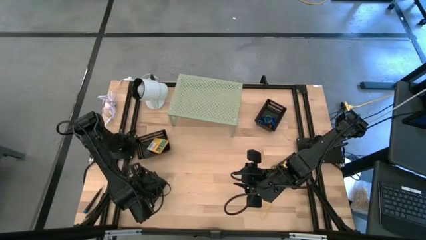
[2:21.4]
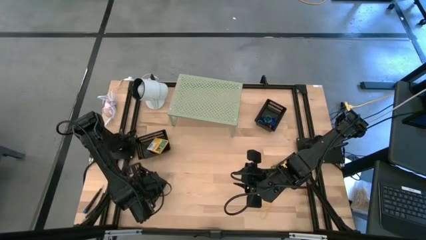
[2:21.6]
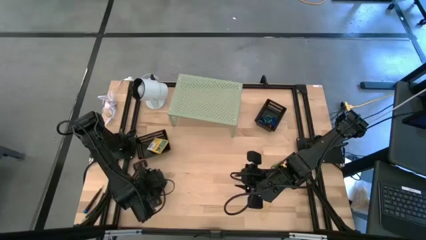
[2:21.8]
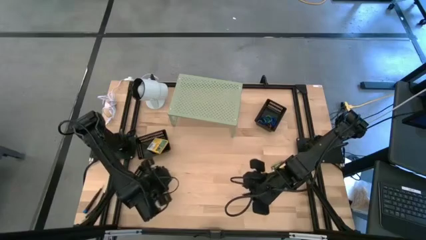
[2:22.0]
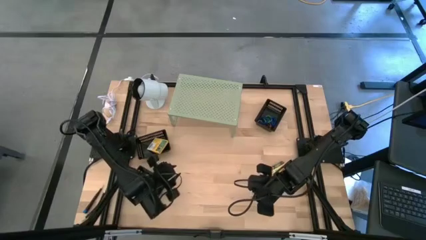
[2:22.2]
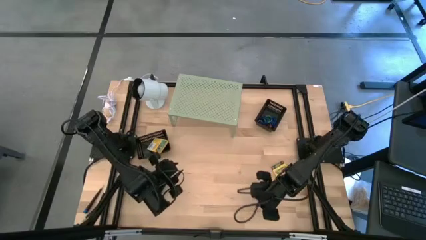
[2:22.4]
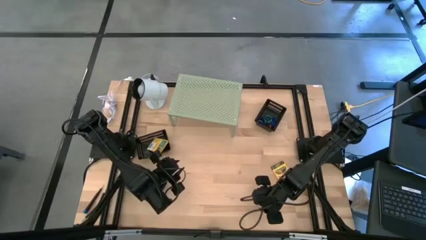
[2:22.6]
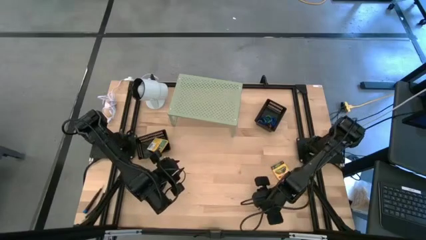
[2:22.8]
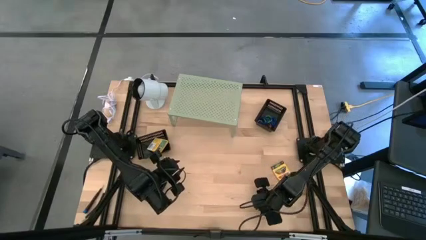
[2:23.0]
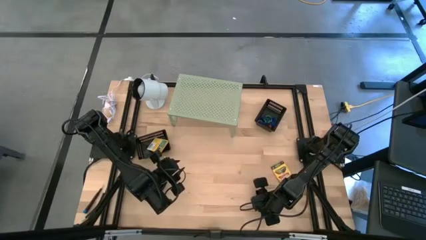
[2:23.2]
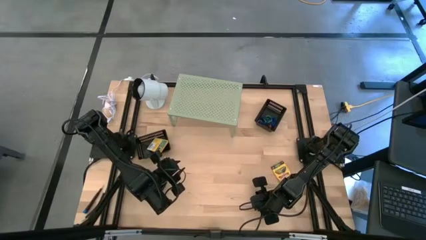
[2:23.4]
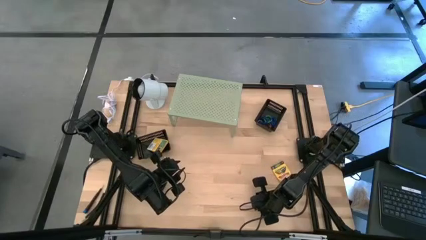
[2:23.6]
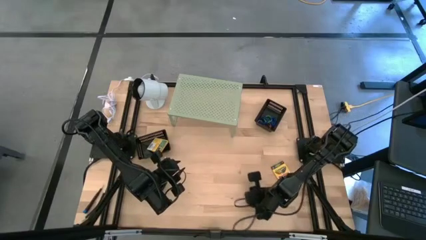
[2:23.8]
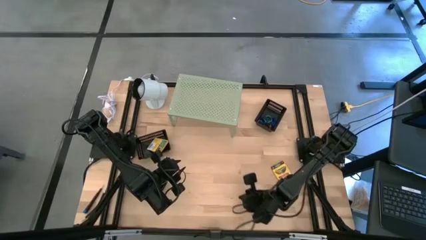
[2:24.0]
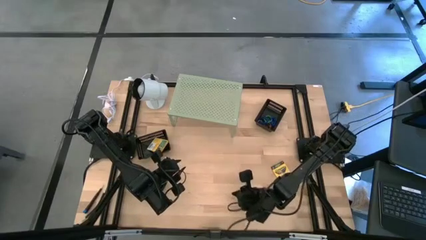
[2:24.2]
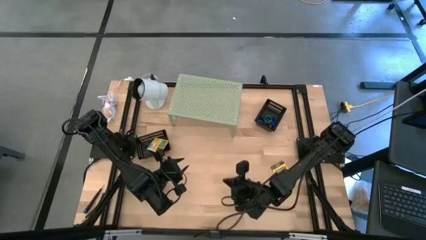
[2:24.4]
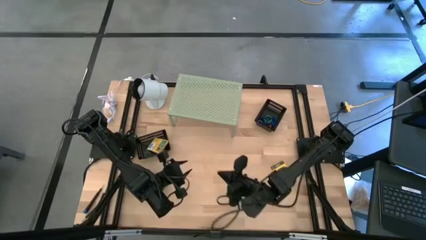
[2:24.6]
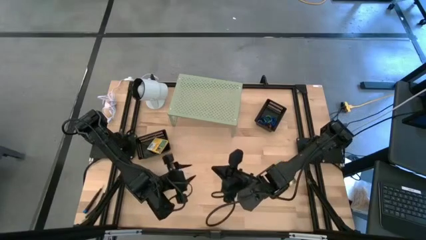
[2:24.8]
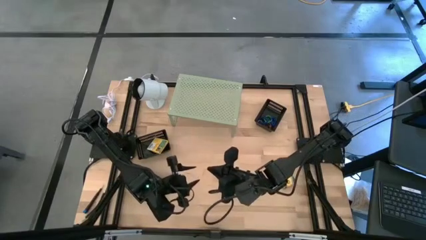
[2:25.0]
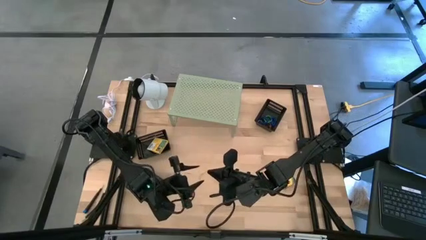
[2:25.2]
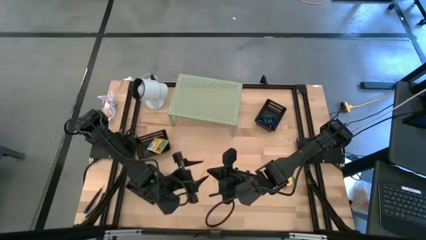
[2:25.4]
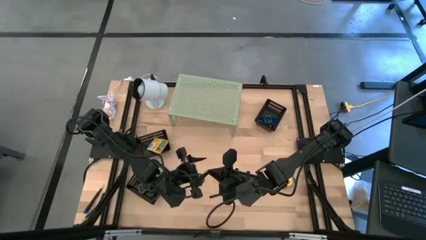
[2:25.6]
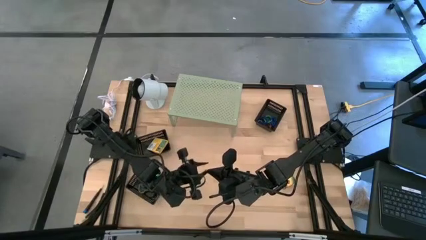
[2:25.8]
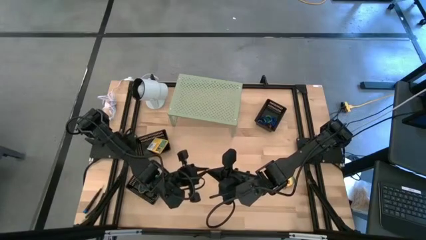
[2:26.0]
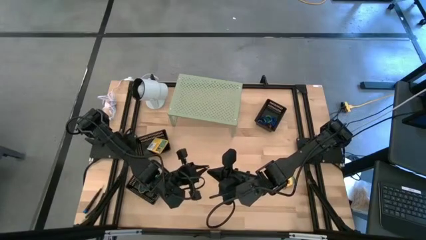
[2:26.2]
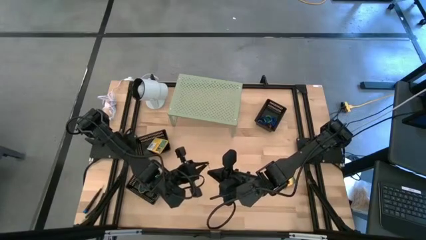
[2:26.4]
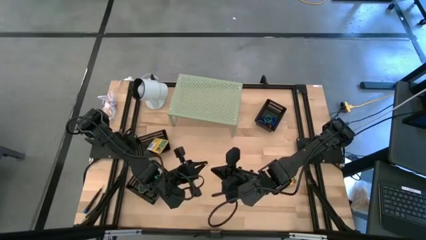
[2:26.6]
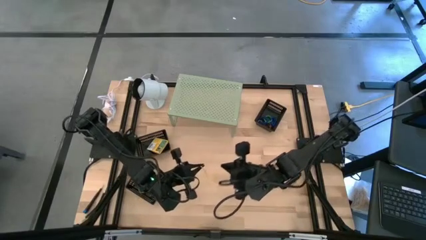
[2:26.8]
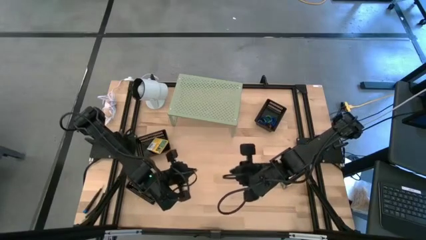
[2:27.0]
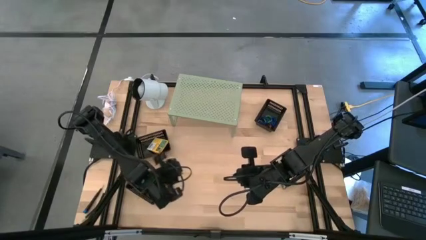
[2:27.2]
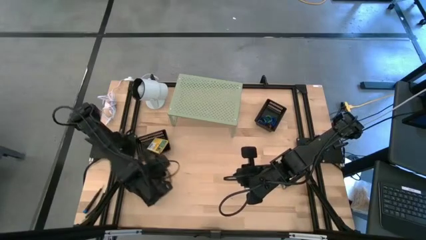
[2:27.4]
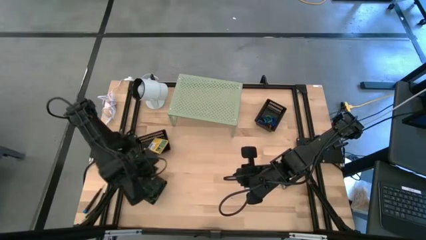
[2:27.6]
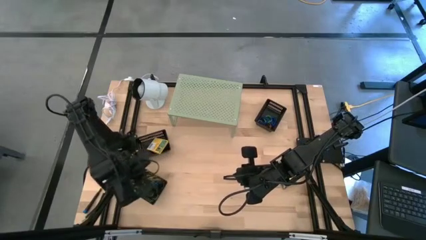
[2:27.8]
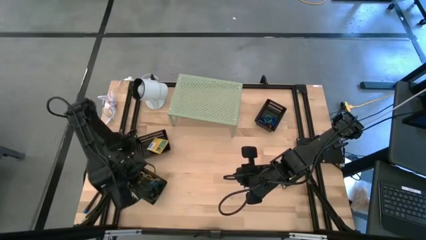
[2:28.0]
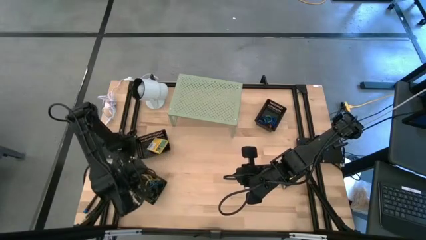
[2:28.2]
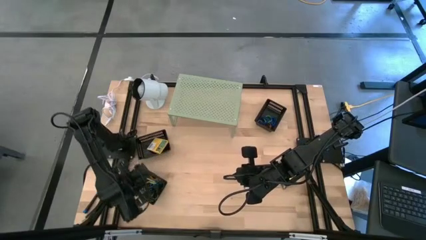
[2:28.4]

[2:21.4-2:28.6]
Task: Pick & Place Office Desk Supplies
Put the yellow rubber band into the bottom left black bin

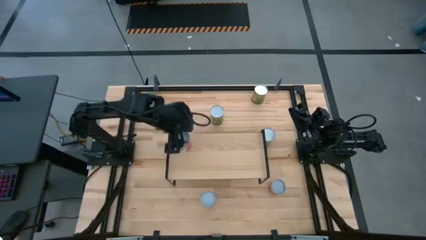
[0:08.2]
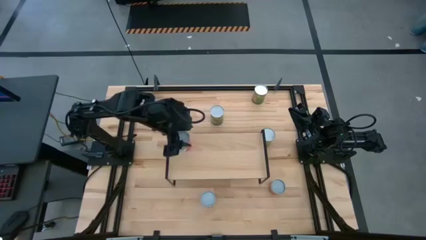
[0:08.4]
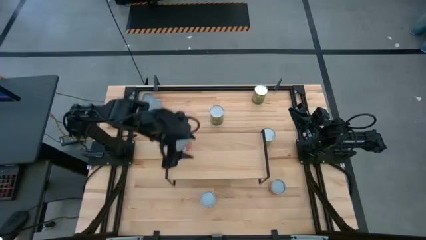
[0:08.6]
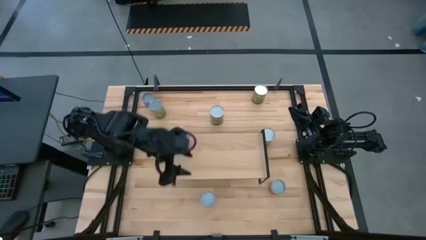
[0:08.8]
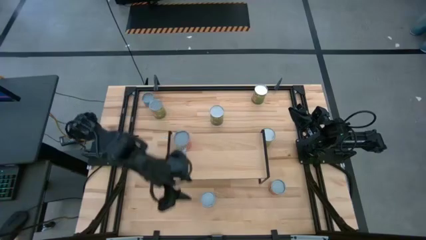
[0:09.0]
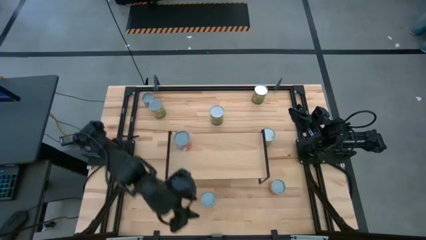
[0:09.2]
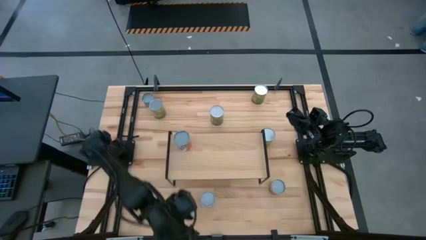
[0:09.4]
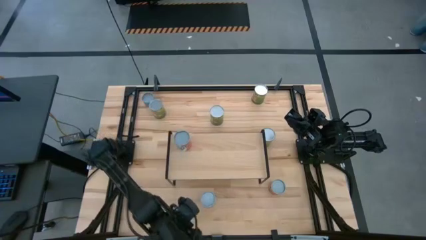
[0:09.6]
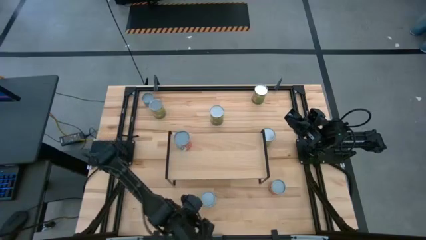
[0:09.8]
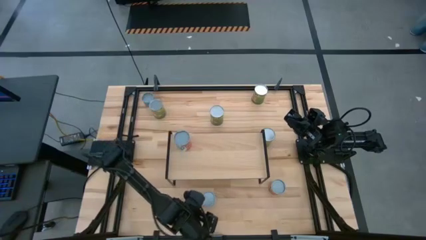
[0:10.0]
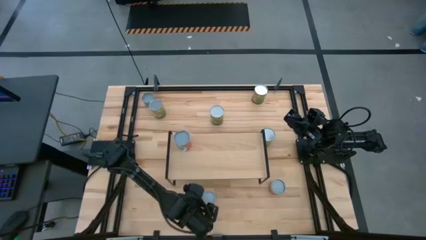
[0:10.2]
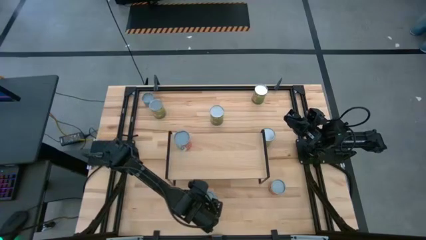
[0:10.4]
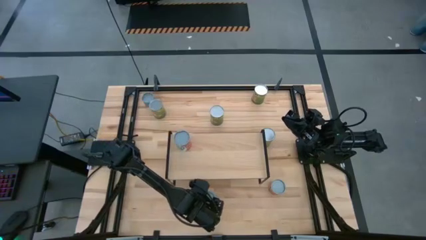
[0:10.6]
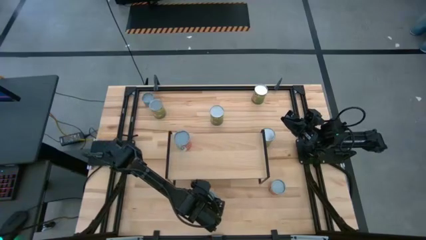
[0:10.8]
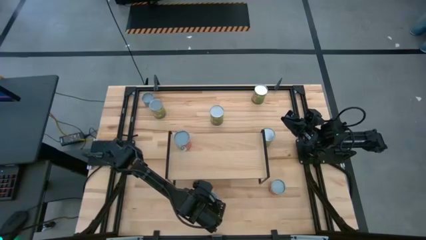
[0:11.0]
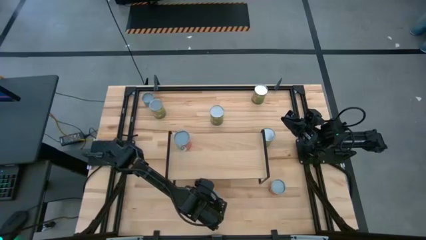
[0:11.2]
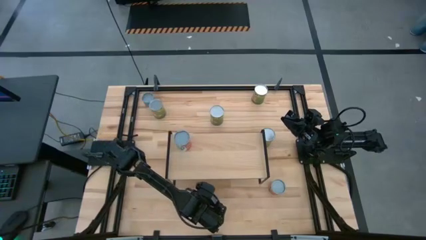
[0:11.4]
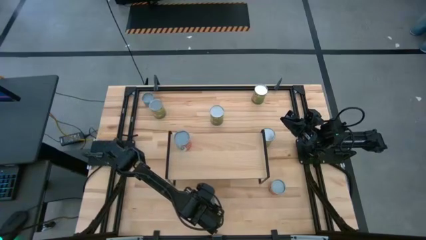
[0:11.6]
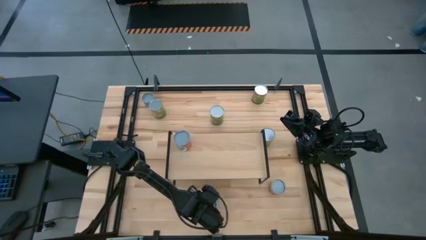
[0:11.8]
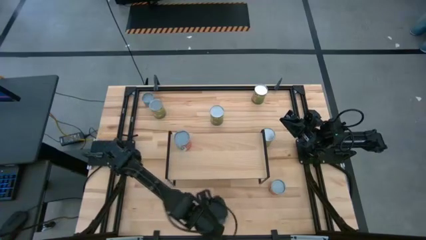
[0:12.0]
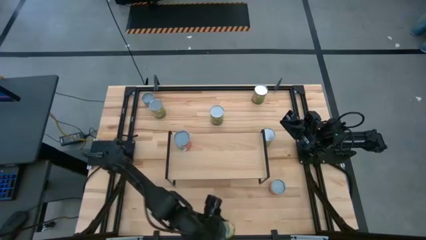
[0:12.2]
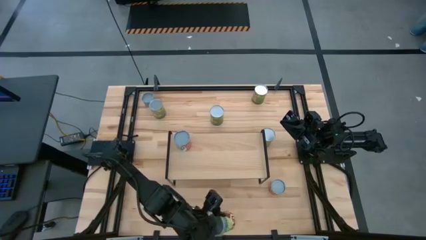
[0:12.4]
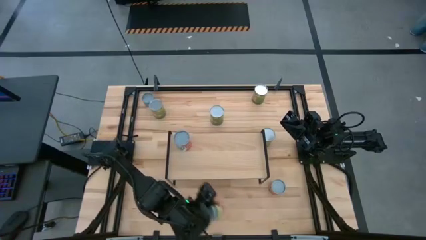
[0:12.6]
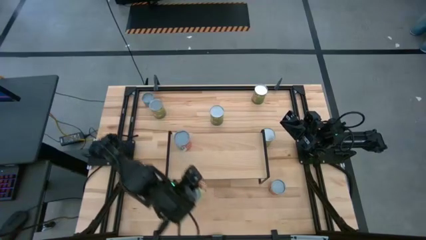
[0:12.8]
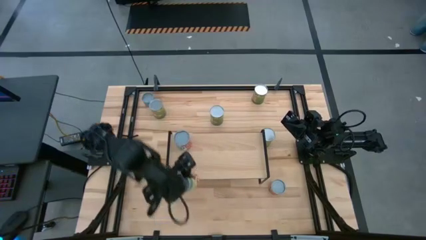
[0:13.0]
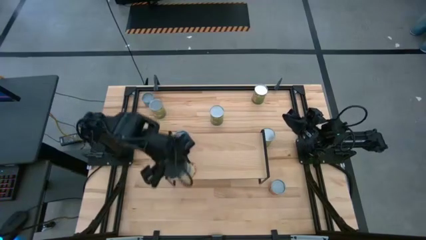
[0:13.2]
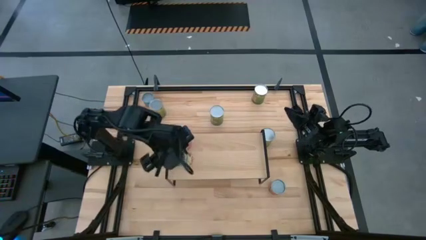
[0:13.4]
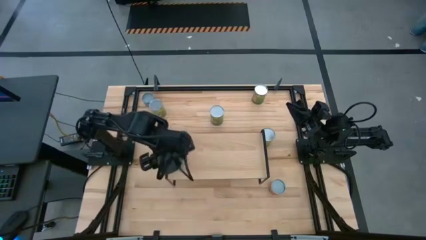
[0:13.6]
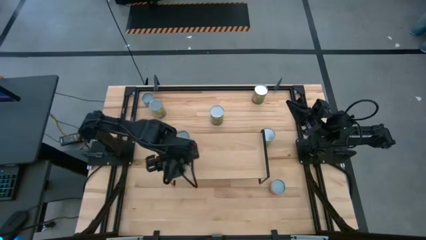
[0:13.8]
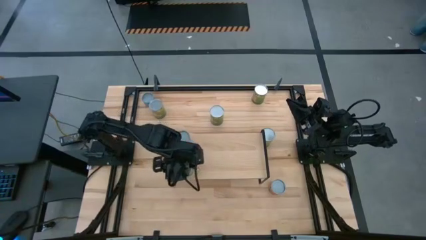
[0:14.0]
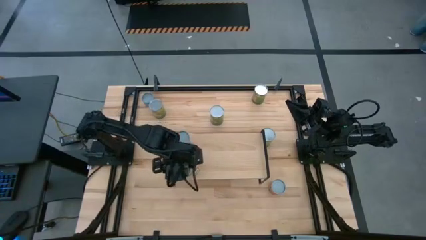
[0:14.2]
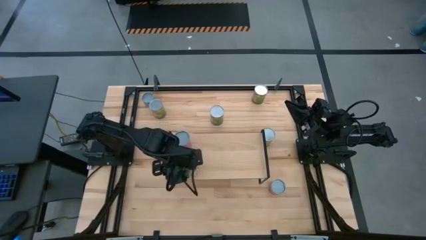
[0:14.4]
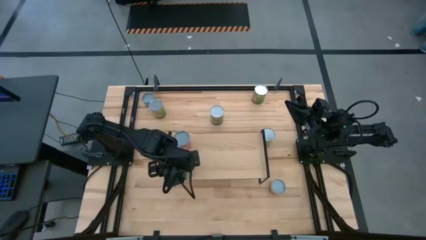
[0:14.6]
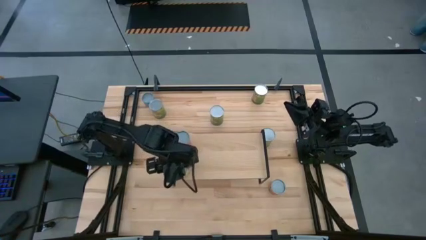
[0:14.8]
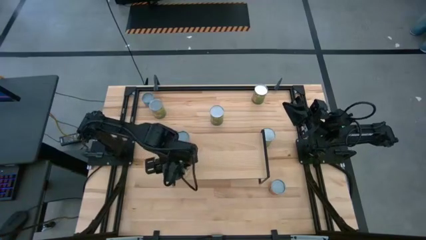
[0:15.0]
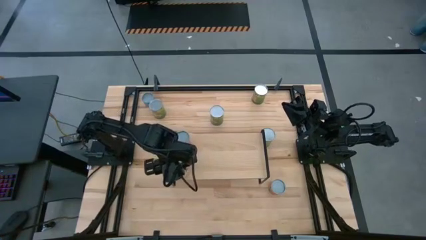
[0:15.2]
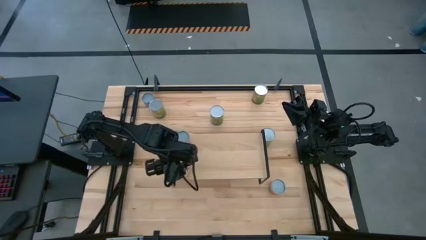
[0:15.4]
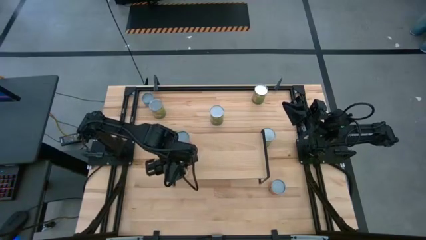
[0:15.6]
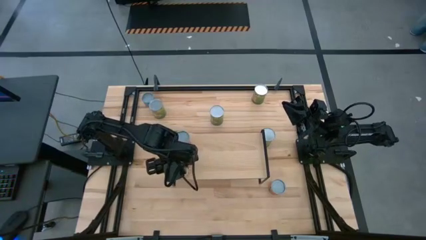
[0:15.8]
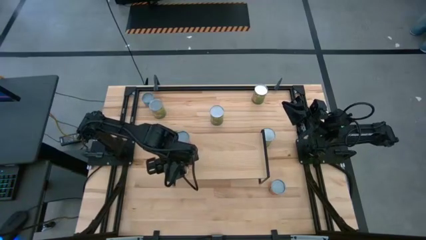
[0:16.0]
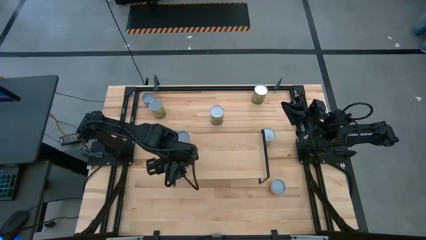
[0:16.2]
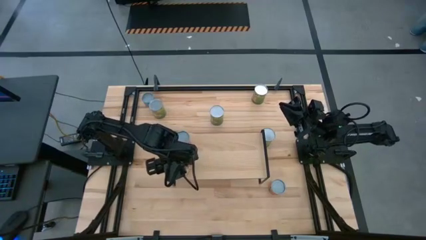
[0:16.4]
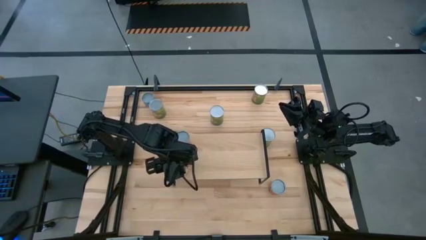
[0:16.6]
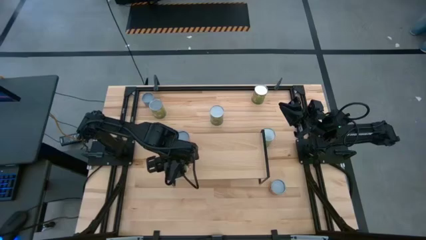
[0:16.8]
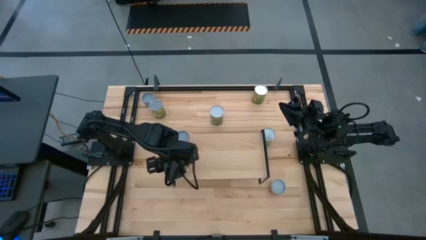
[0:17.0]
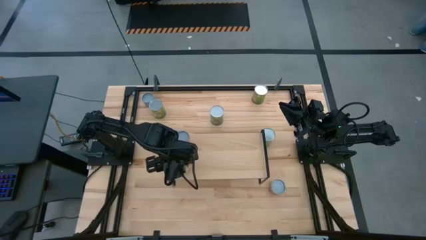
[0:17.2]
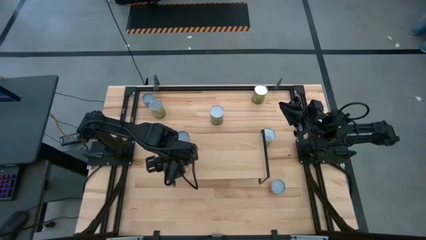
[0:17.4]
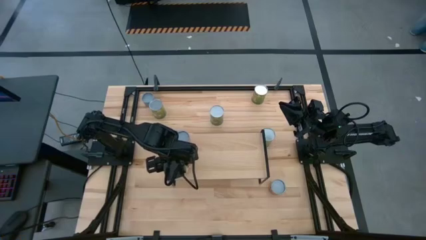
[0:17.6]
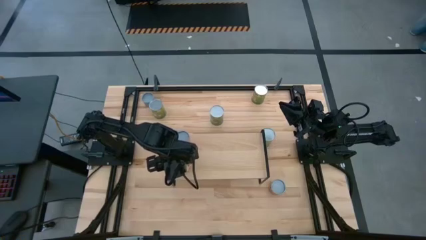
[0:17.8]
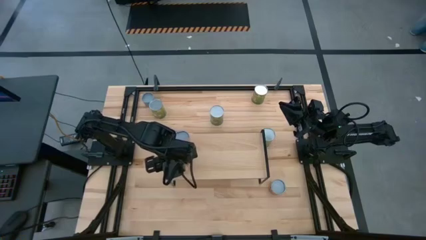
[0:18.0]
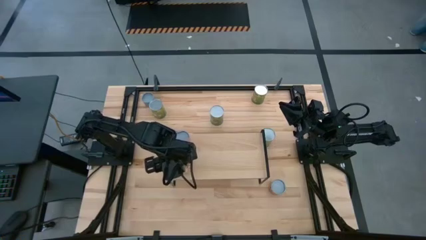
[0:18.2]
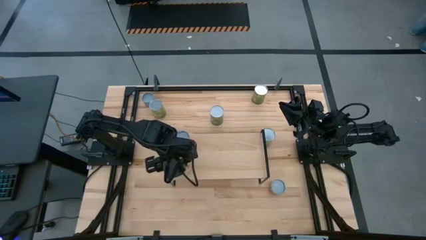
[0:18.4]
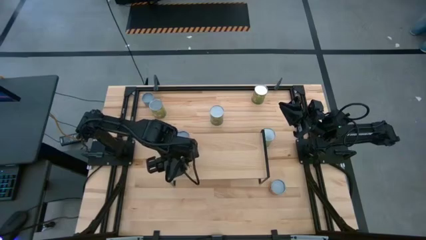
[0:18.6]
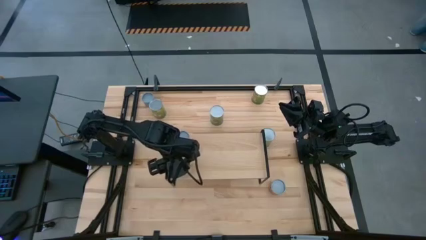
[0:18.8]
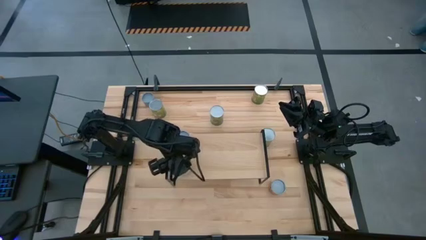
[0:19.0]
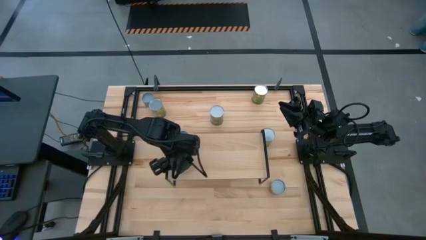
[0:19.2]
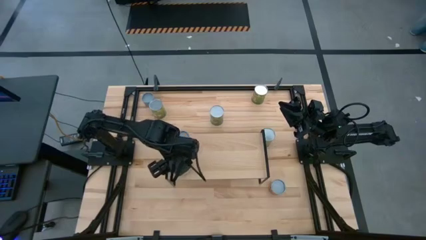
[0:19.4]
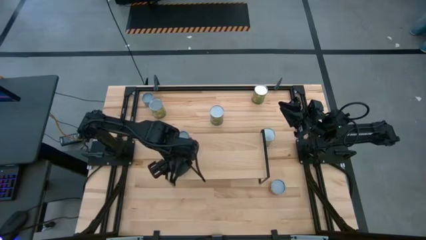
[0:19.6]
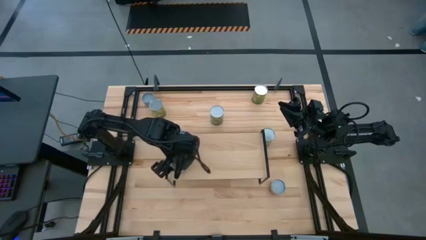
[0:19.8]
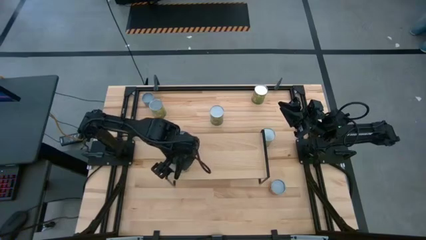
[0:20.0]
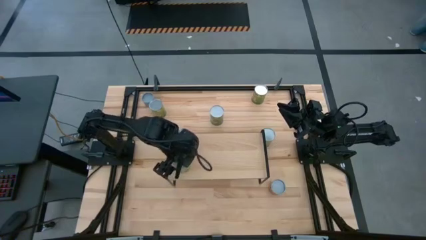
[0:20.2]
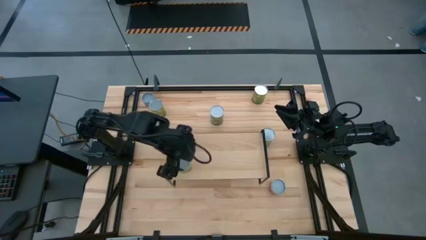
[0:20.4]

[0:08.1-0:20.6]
Task: Pick and place cans onto a shelf
Put the canned spaghetti sauce on the shelf aligned with the canned mixed fruits
